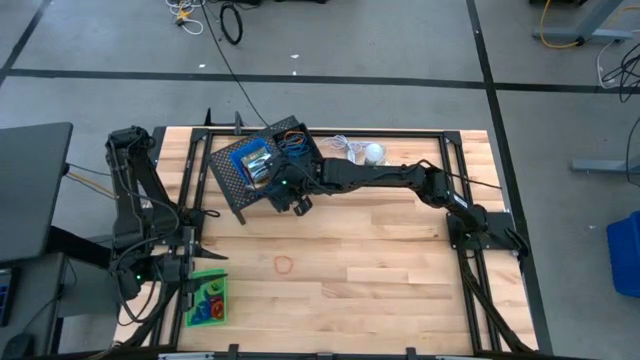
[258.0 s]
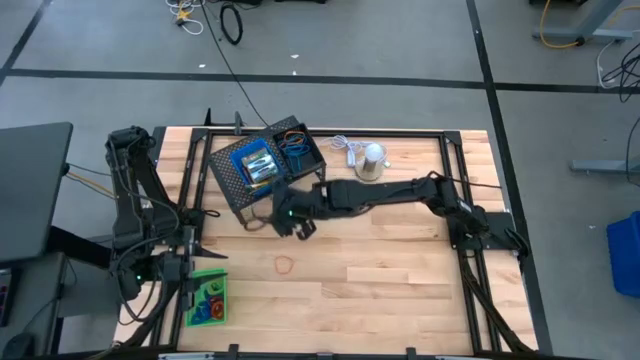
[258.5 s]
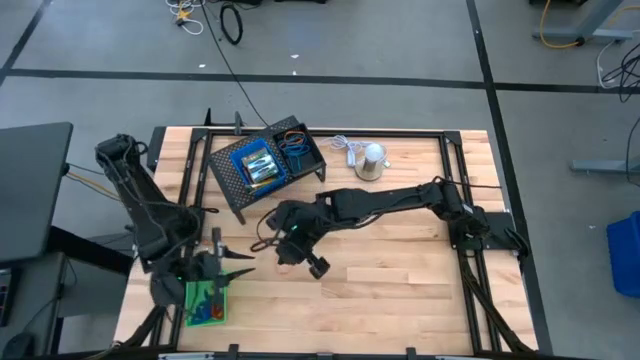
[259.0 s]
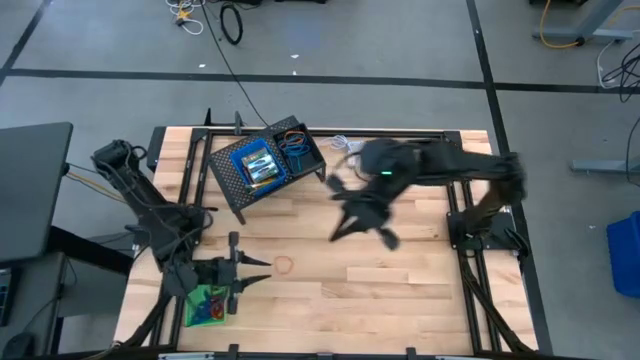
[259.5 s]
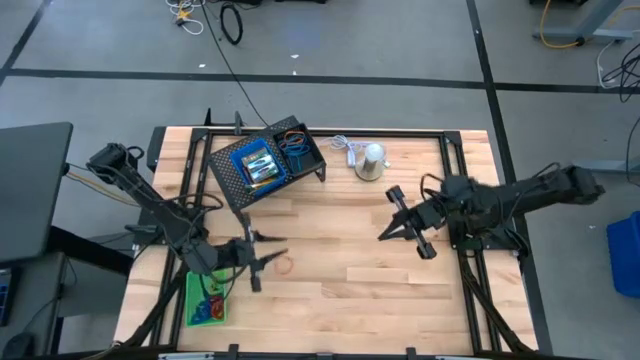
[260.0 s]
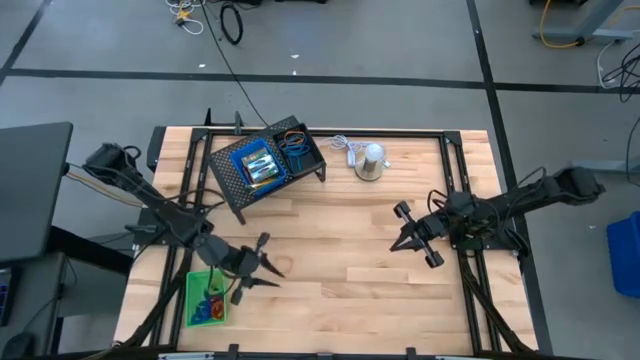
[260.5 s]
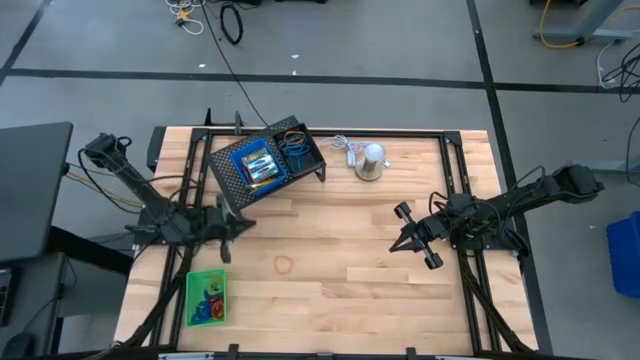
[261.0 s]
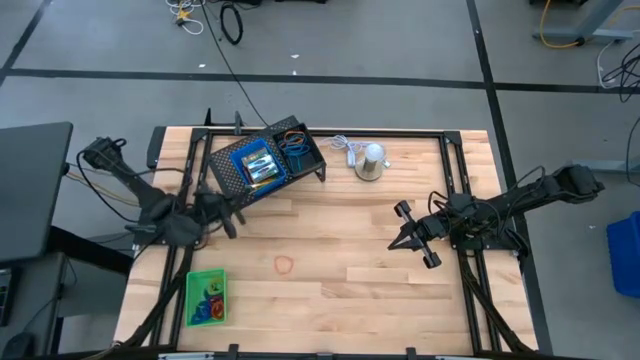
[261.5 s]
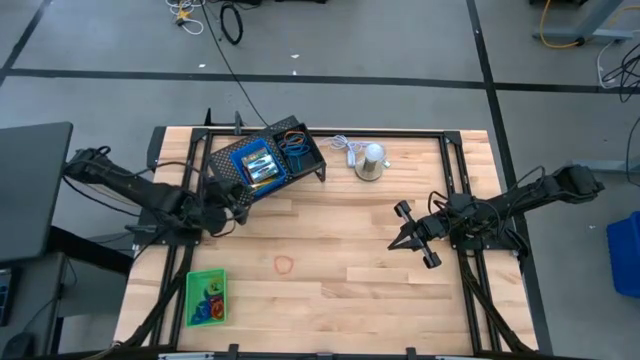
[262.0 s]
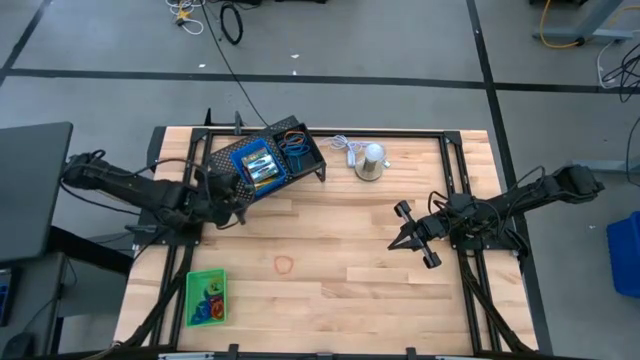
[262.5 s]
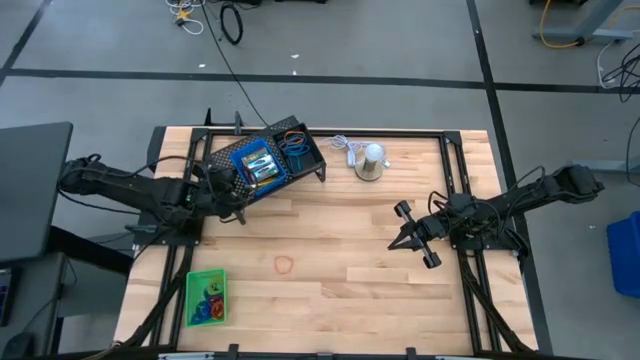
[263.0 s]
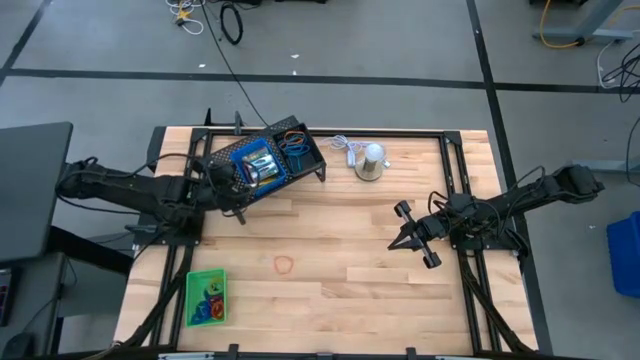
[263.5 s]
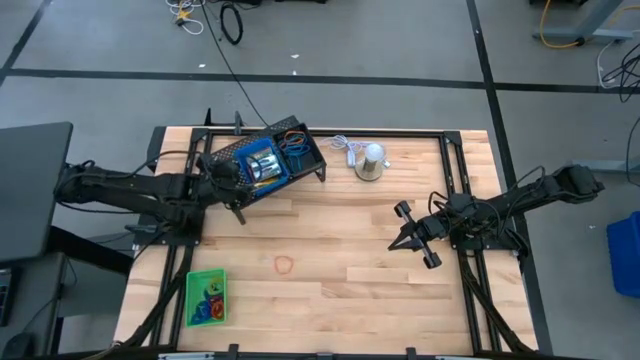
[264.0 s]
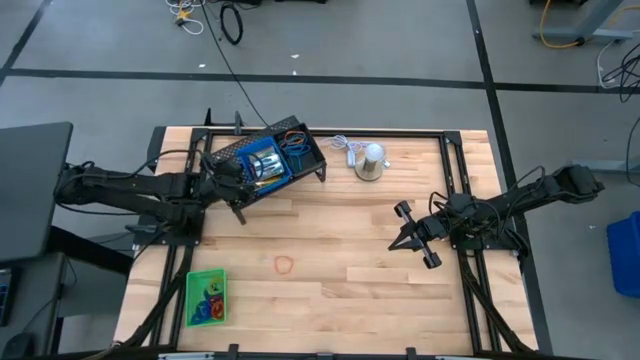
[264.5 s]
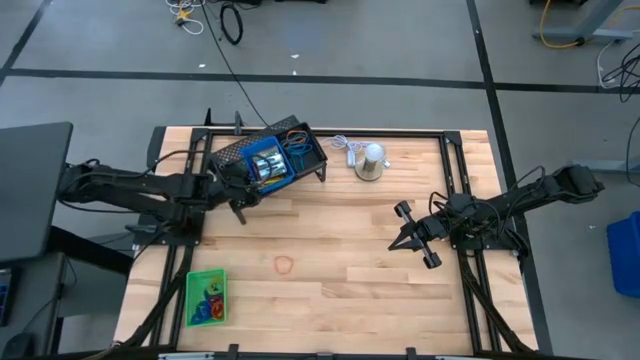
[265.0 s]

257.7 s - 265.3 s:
Task: Pick & Place Office Desk Supplies
Adjust the blue bin on the shelf

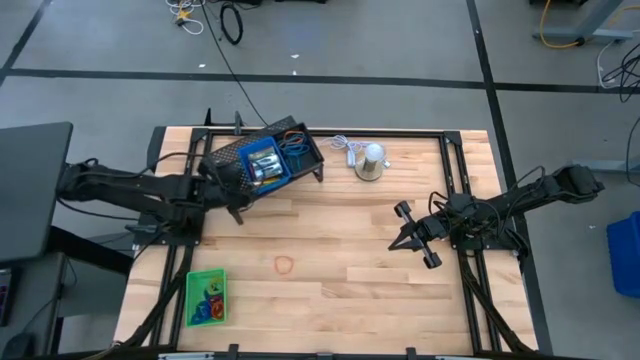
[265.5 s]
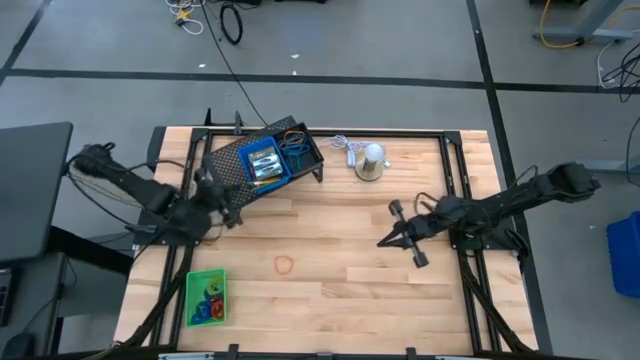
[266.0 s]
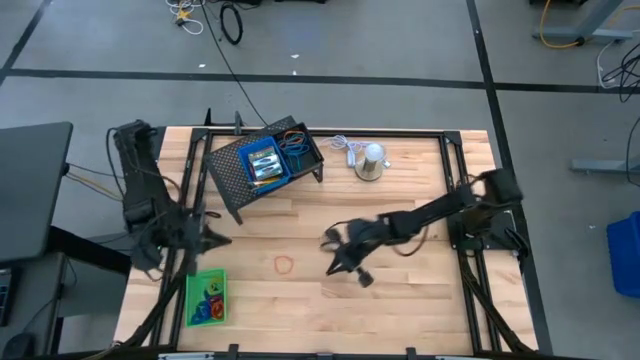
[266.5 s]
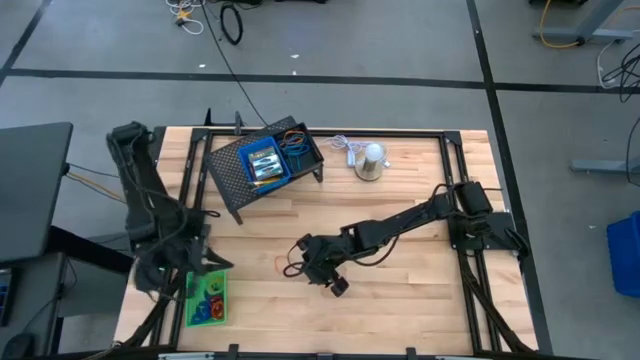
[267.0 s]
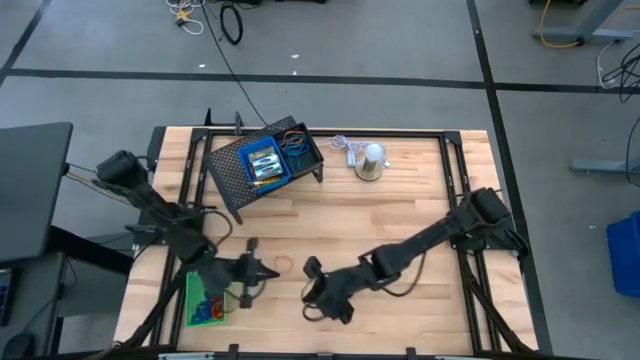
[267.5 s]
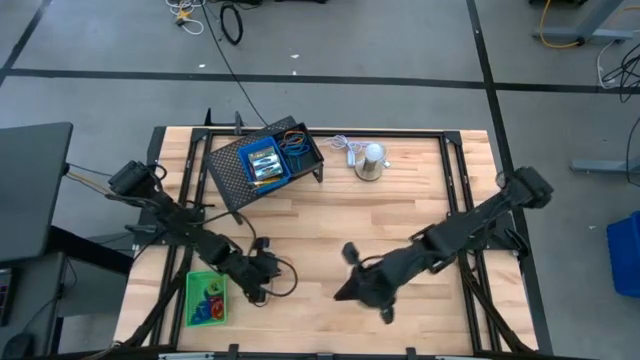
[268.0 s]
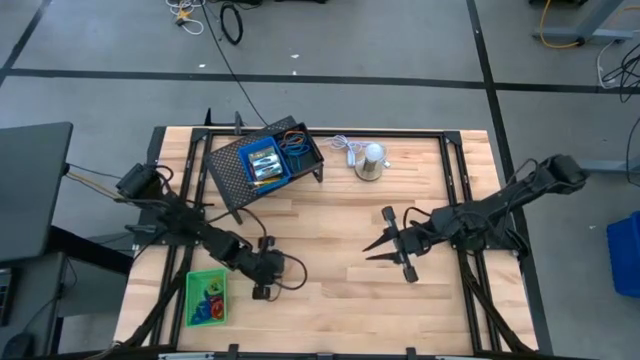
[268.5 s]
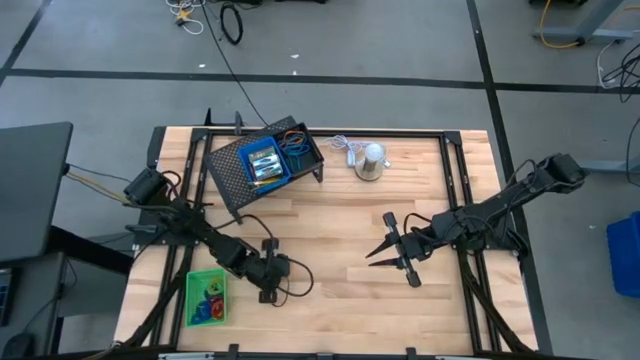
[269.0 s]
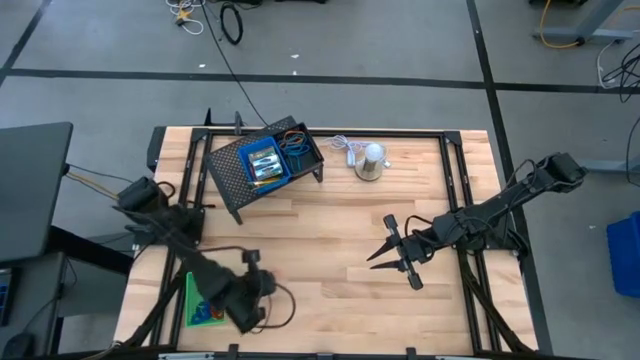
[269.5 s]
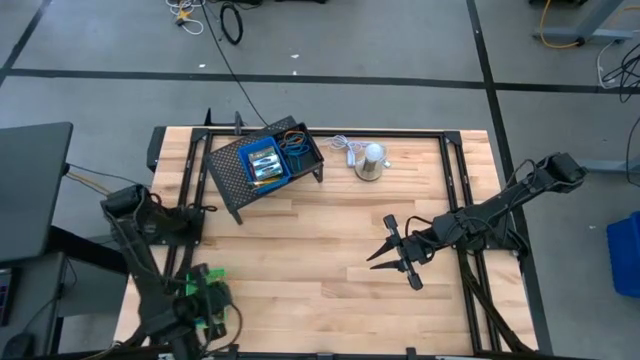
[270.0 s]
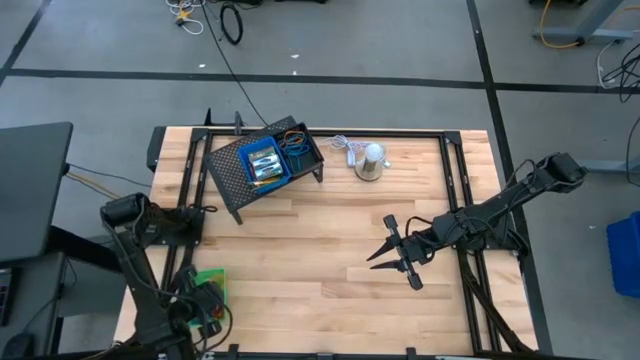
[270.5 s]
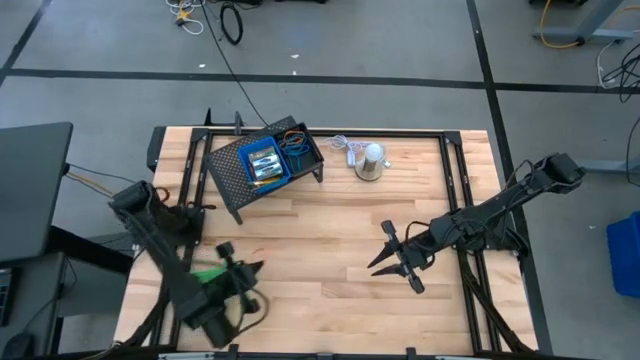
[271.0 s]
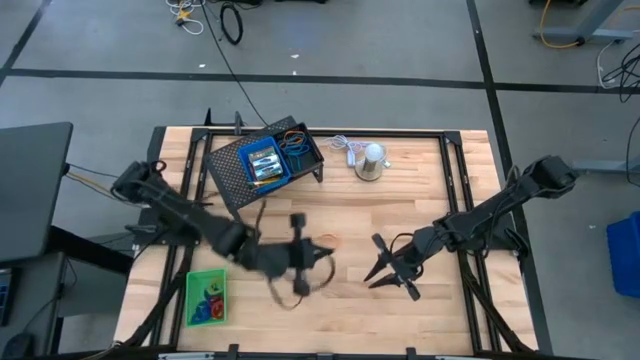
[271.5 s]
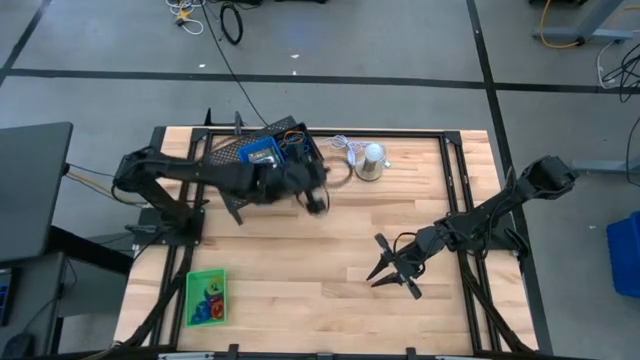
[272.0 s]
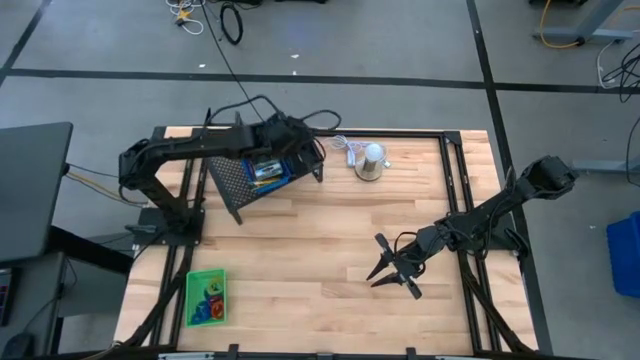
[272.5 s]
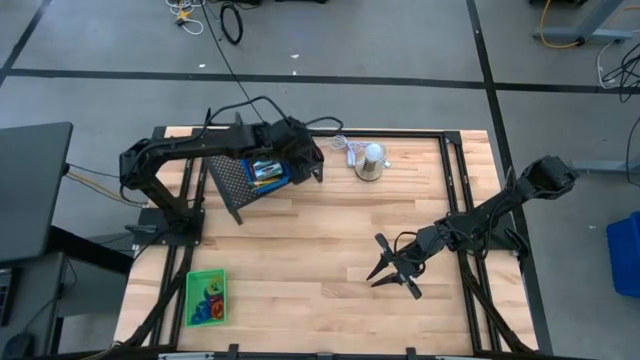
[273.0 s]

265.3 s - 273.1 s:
Put the orange rubber band into the black bin

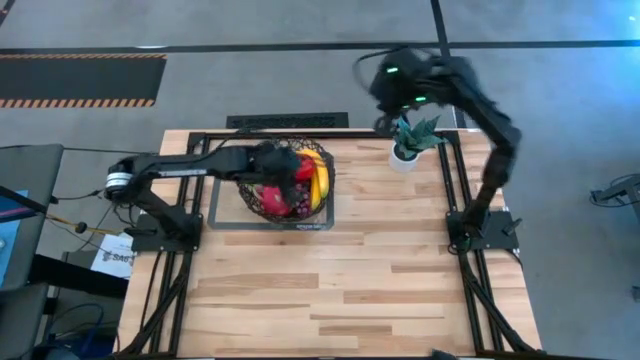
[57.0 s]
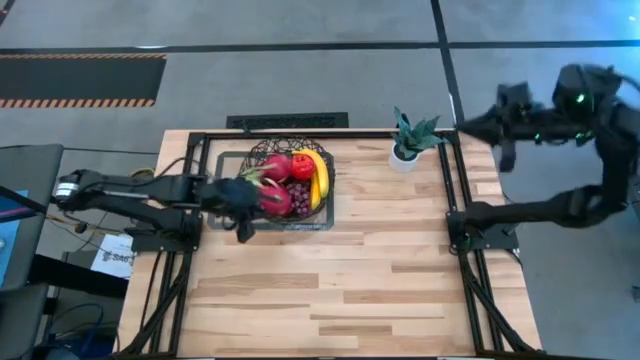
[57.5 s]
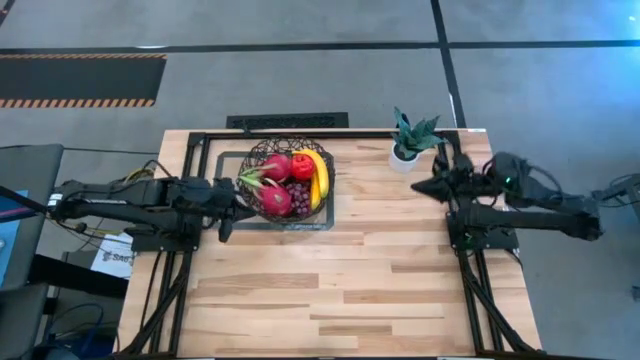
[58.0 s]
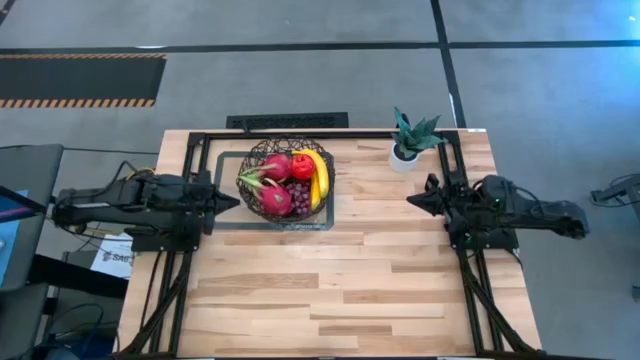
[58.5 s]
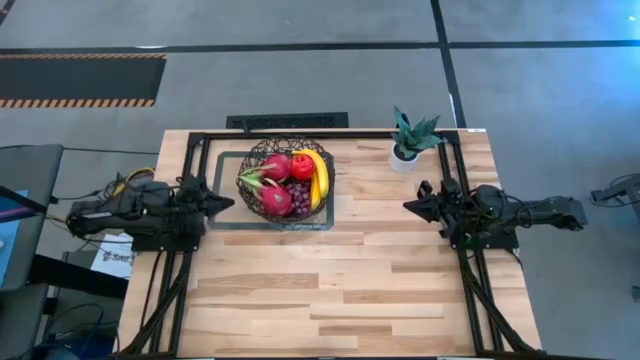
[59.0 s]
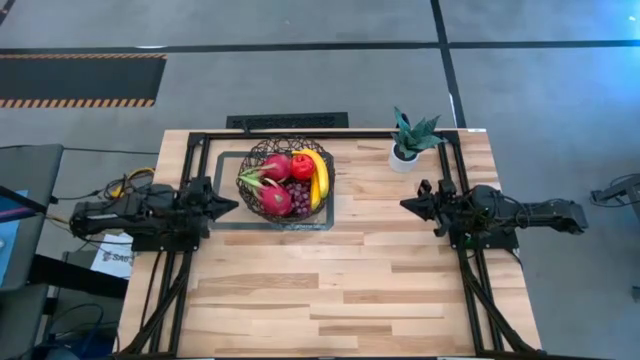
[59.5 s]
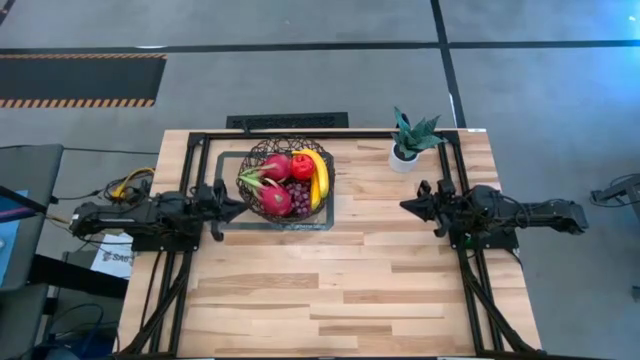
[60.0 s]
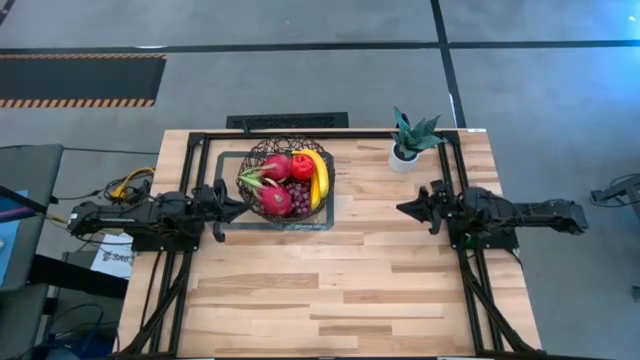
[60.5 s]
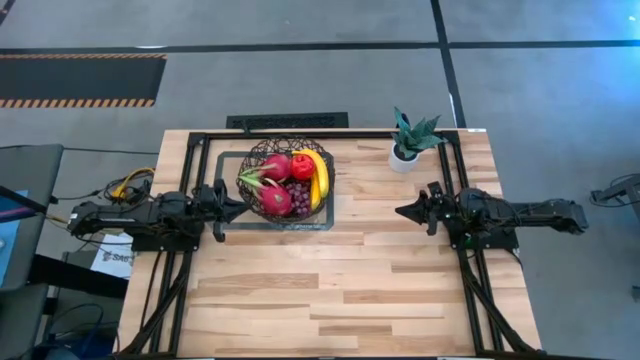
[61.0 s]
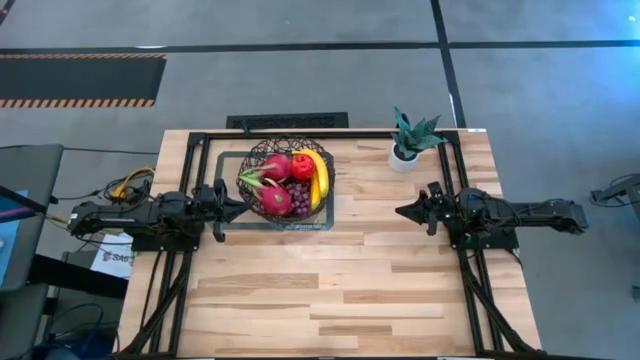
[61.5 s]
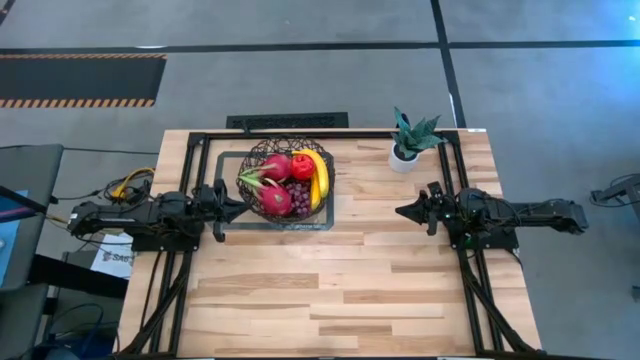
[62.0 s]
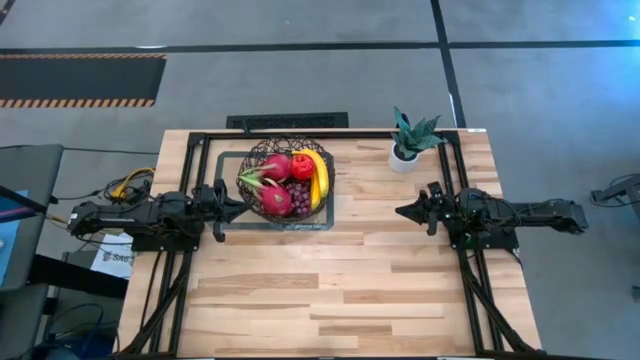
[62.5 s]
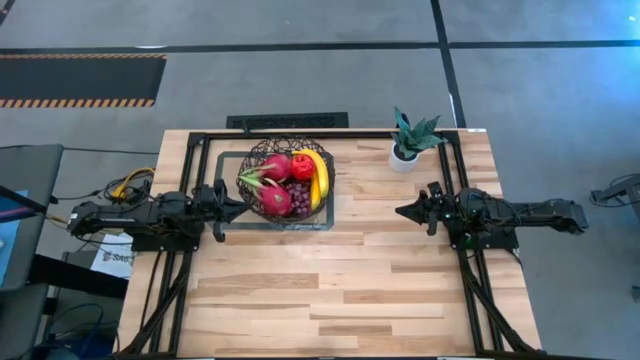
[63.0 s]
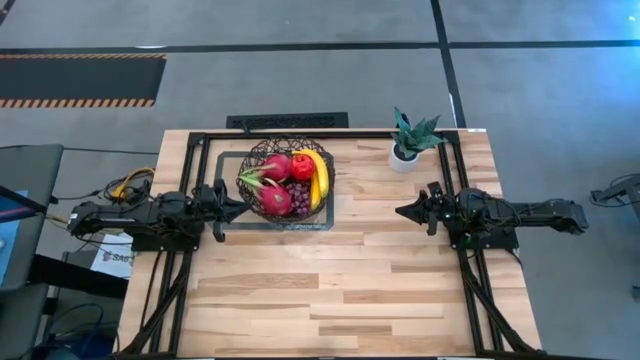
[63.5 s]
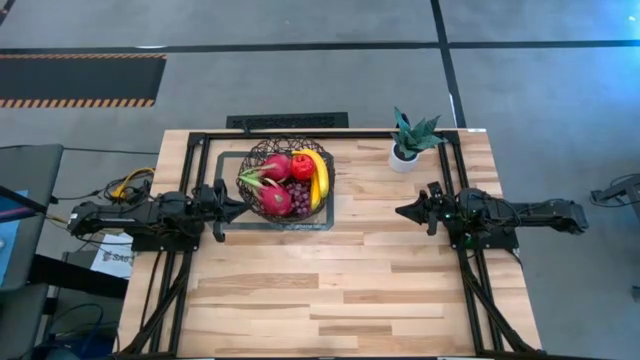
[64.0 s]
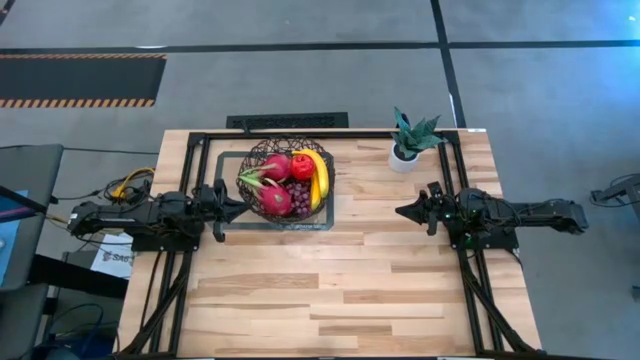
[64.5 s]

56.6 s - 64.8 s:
Task: Build produce basket
Return to Home Position
